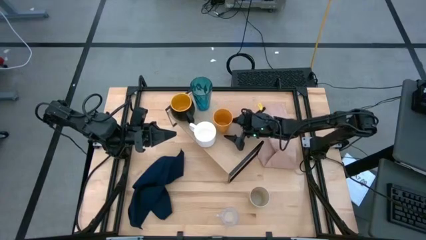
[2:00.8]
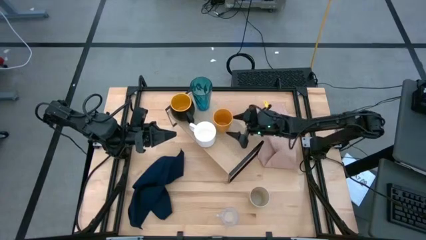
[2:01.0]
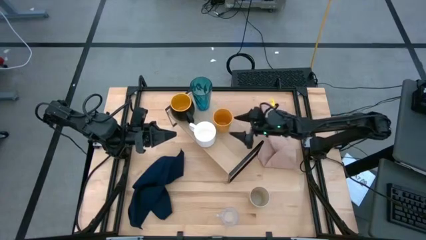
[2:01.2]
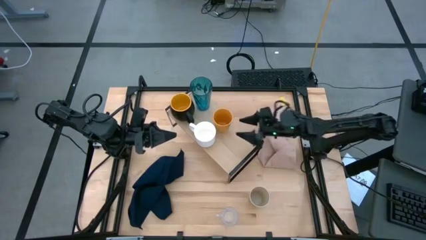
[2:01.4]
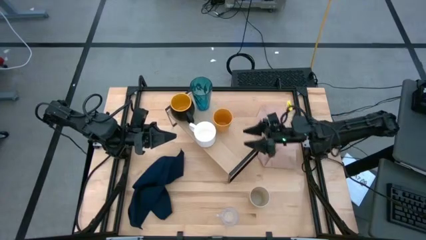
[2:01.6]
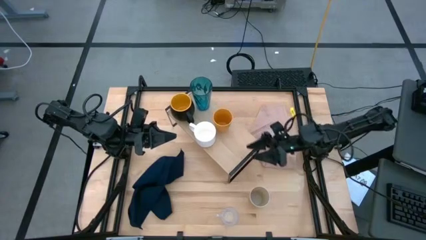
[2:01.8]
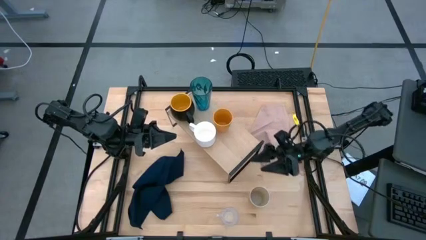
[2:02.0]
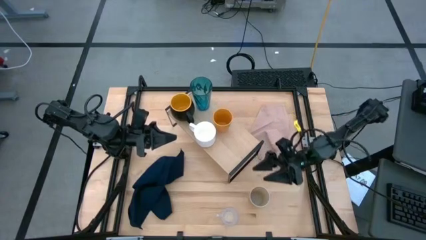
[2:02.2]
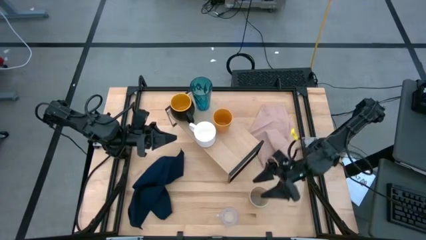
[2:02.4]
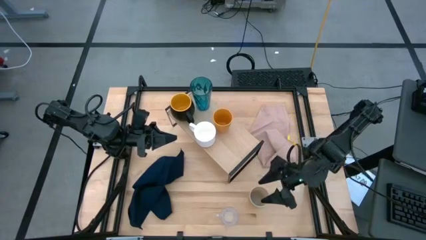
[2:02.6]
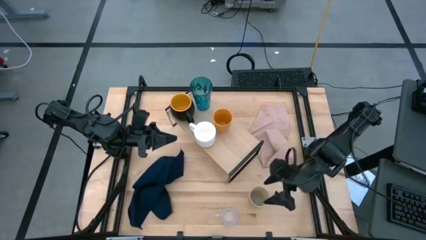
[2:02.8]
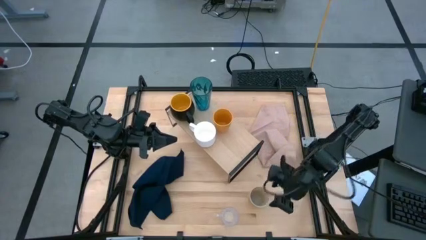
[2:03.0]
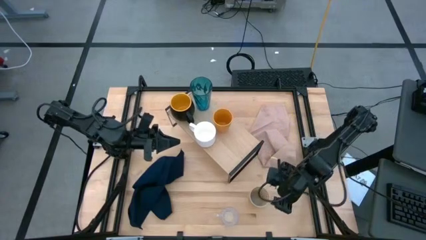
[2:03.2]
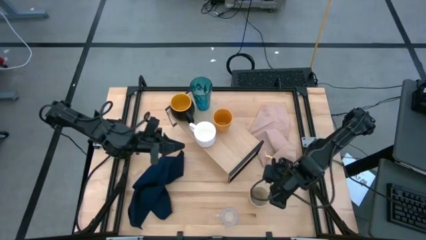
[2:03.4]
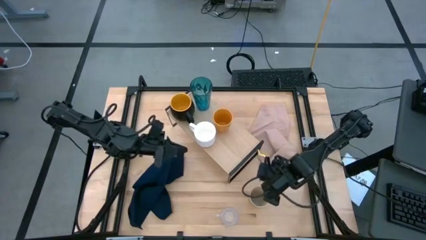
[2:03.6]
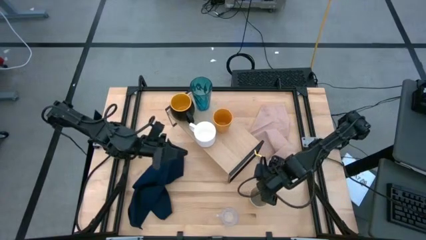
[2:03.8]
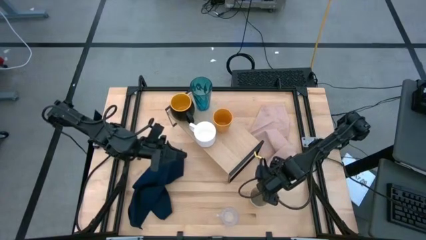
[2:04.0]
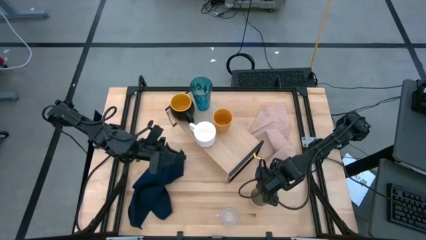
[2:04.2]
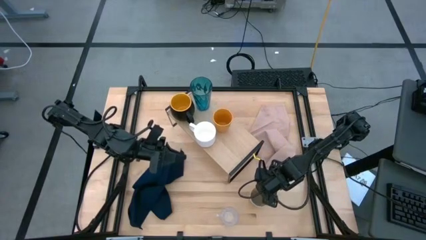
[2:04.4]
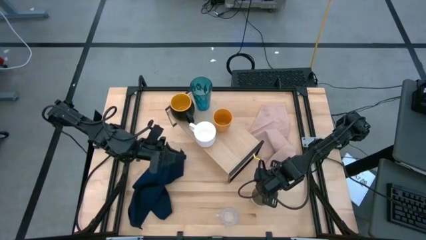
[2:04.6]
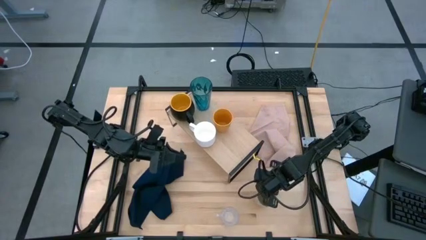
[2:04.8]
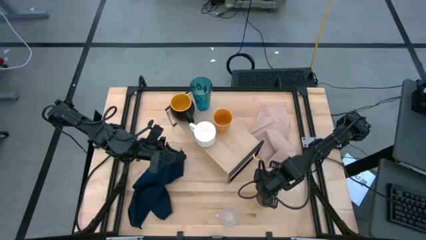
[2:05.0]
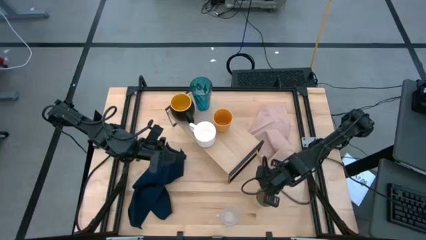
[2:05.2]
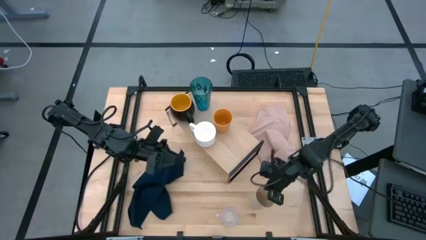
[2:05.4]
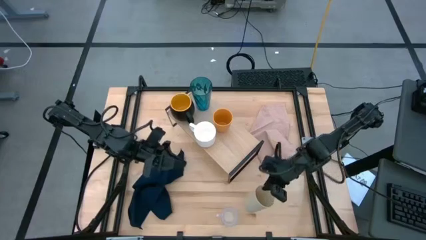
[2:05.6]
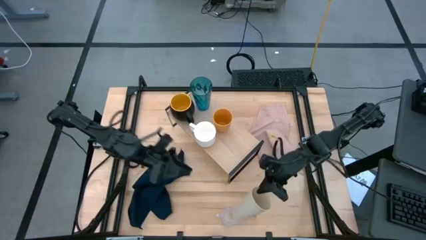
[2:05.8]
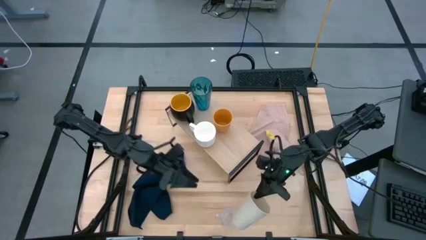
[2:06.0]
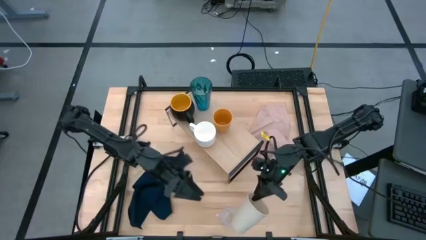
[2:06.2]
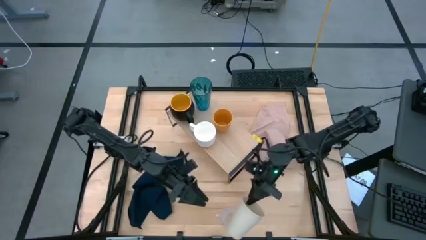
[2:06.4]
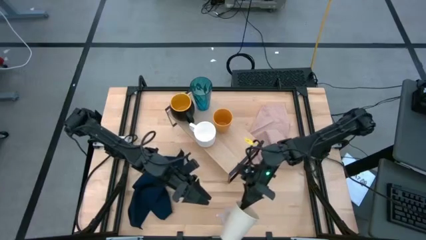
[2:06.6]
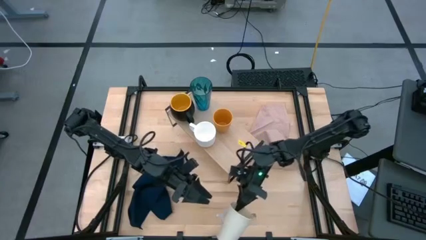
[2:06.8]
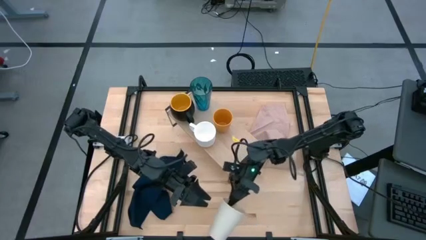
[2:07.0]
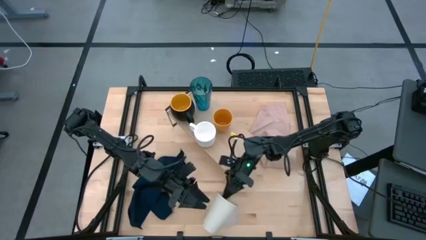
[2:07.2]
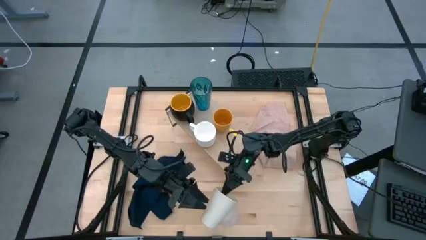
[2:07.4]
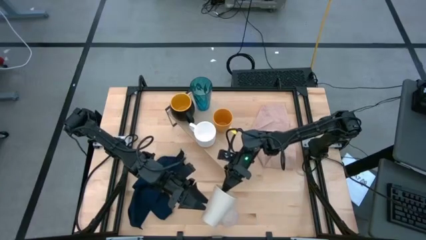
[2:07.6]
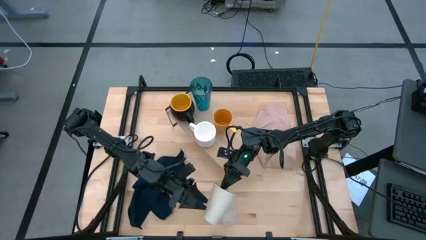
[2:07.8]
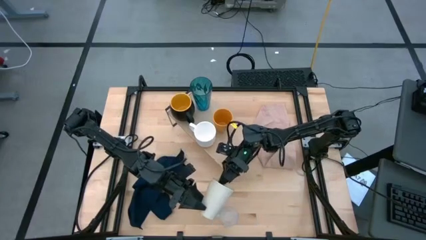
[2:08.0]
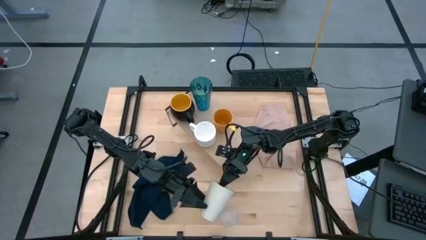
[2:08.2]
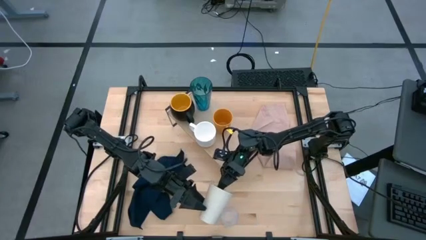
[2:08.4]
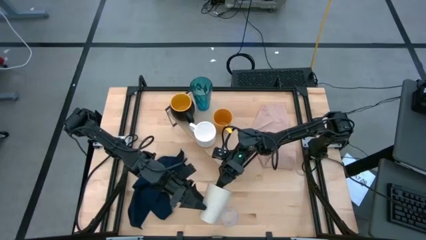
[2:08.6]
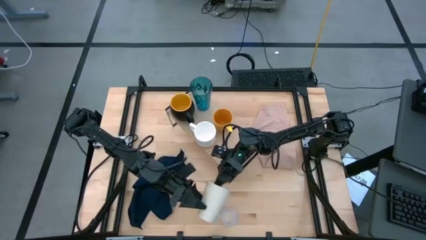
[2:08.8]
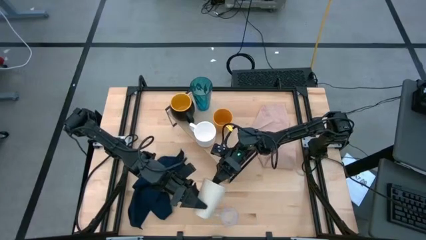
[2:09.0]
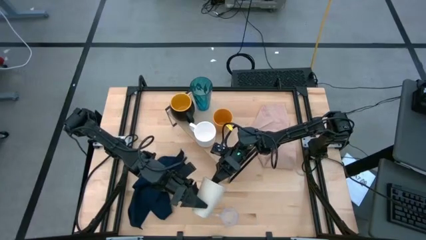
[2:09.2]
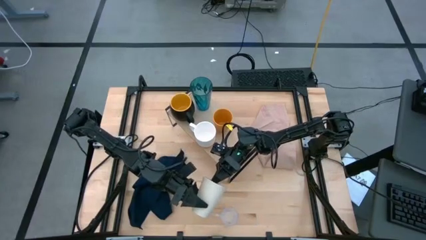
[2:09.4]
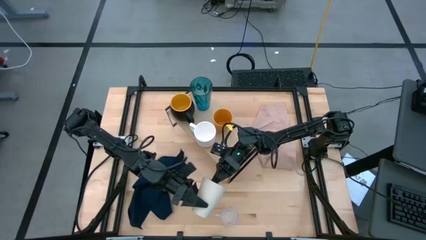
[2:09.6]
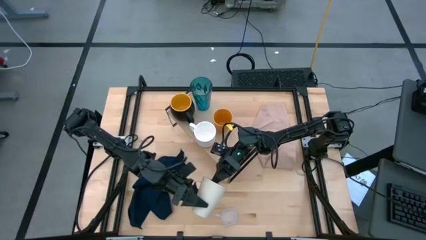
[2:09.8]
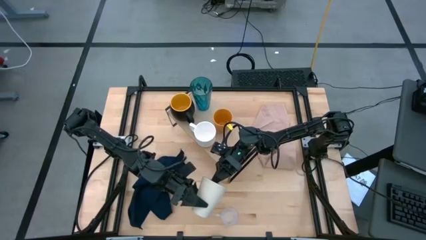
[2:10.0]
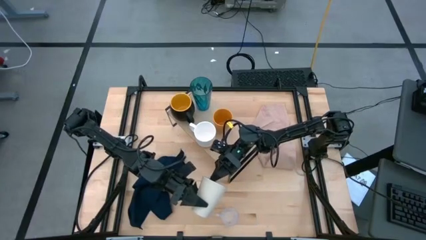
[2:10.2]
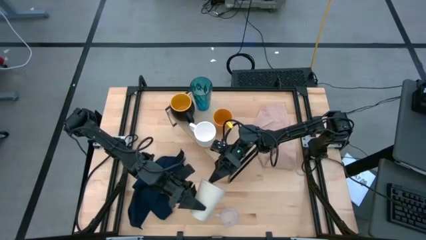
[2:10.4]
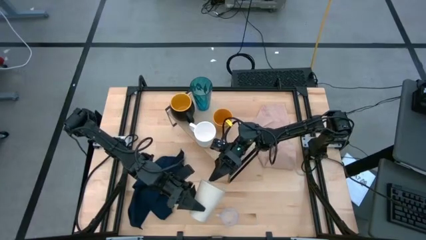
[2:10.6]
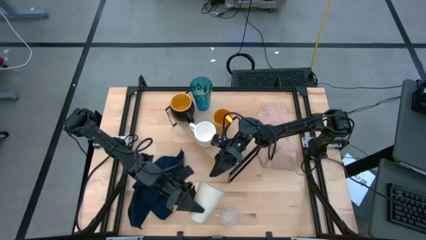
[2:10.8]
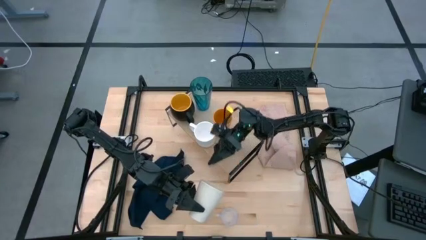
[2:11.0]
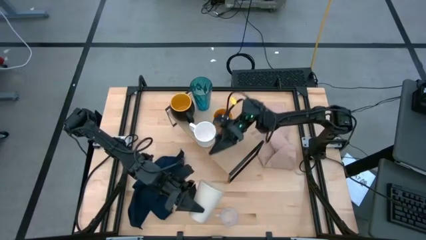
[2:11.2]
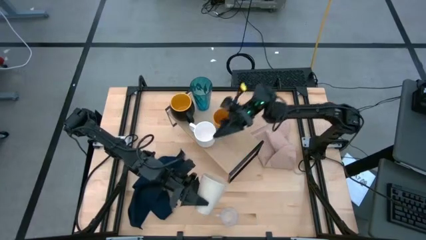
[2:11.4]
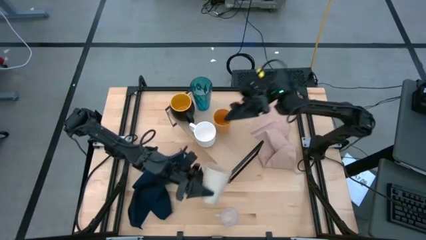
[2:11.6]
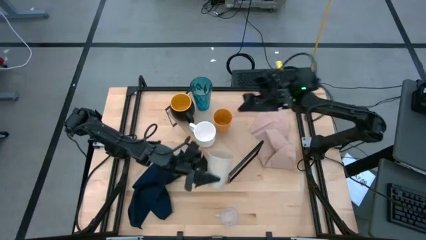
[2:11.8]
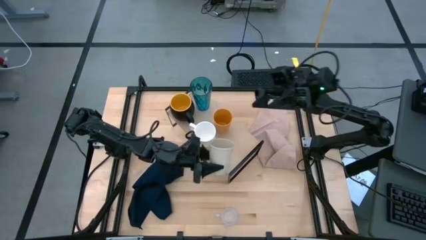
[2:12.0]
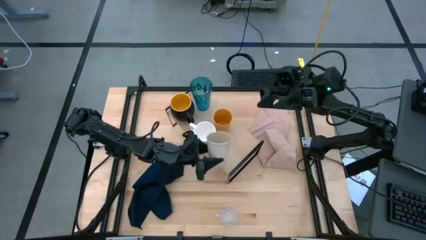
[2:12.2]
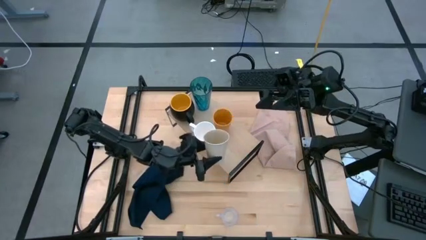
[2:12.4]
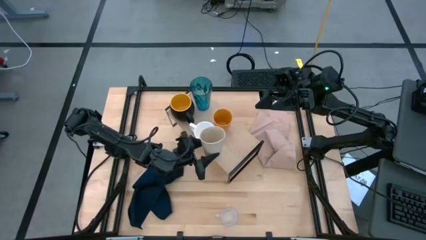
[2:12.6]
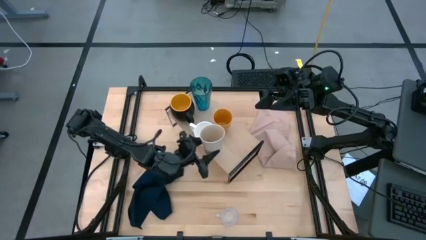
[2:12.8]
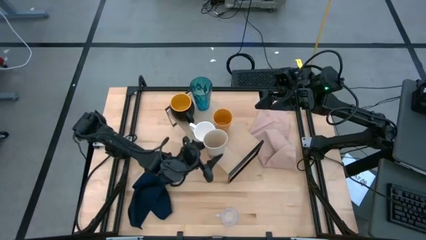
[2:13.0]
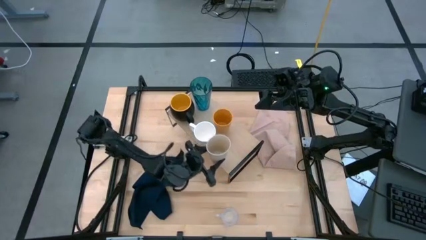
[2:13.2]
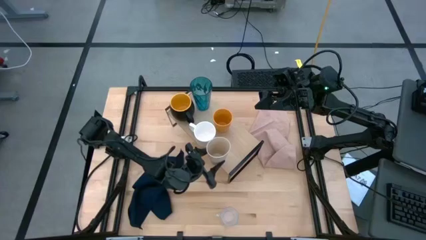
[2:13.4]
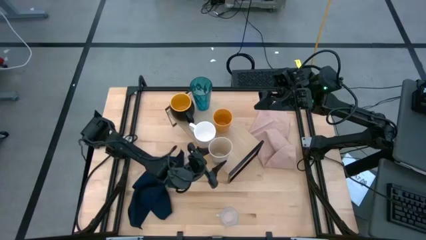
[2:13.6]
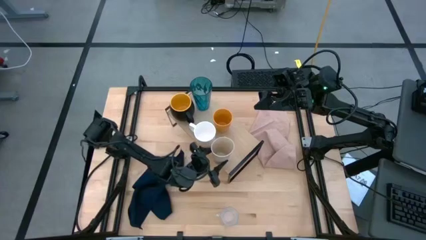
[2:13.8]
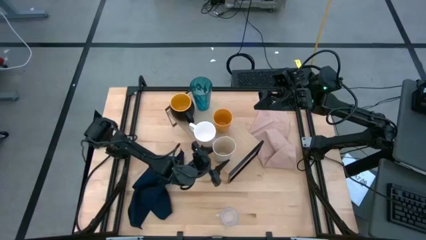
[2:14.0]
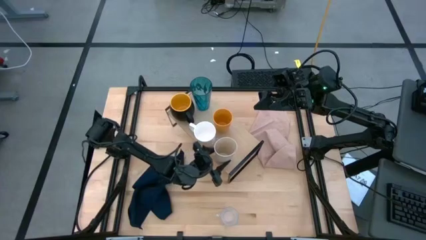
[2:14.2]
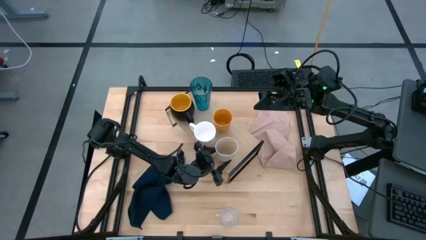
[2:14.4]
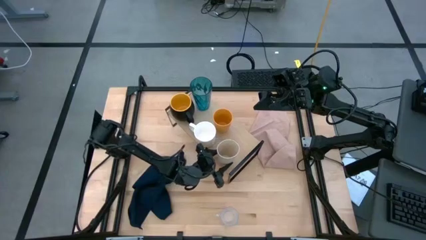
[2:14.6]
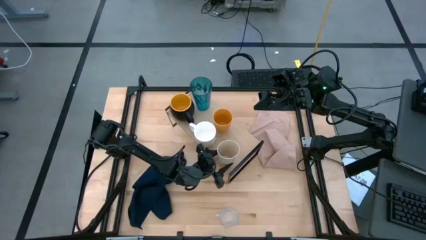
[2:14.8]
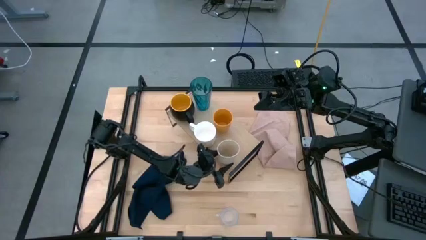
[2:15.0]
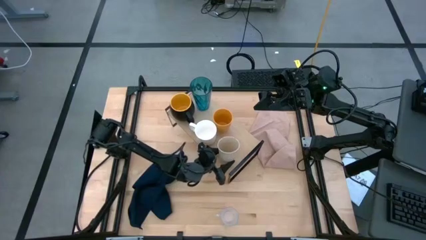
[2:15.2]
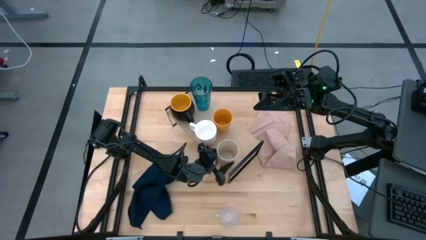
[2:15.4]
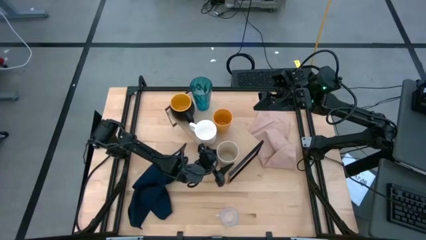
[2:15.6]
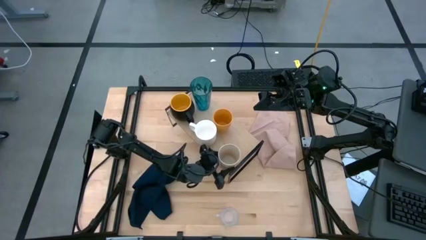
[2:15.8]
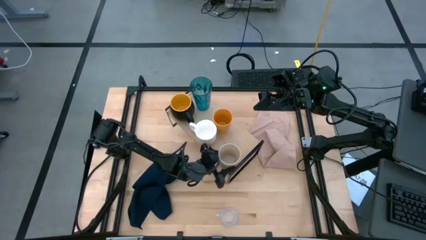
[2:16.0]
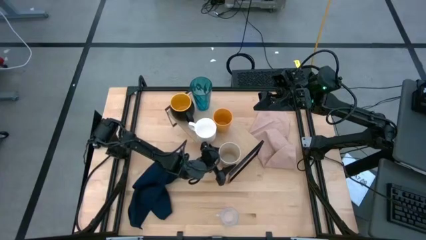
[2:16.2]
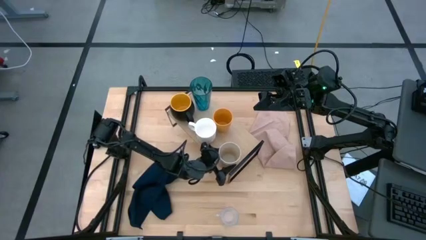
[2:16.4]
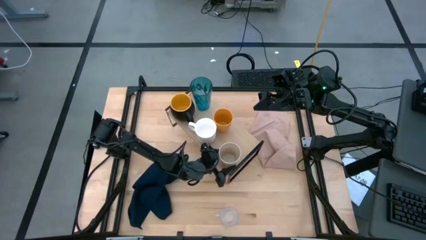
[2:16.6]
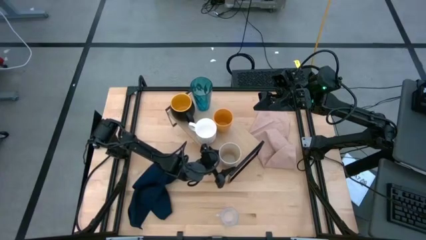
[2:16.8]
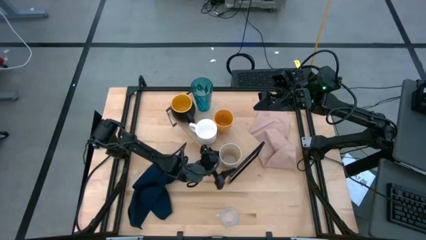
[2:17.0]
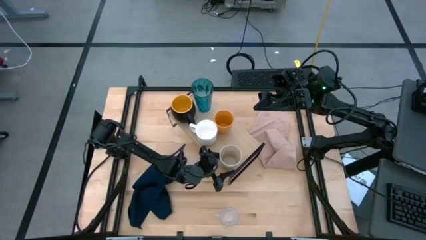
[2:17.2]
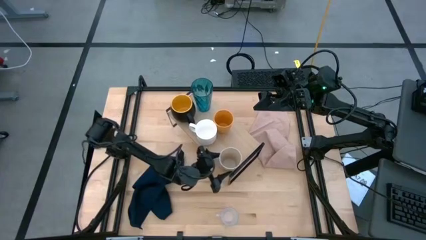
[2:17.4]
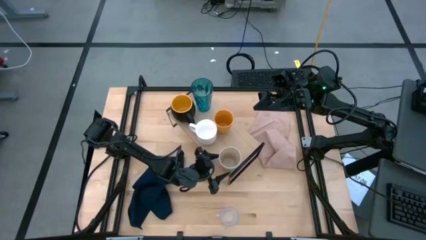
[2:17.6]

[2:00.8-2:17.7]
Task: Stack small to large cups/mugs on shelf
Put the gray cup on the shelf
